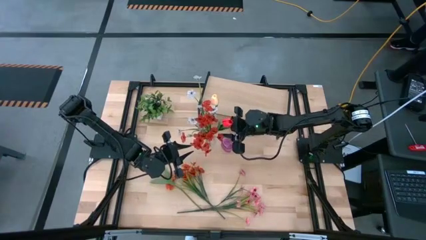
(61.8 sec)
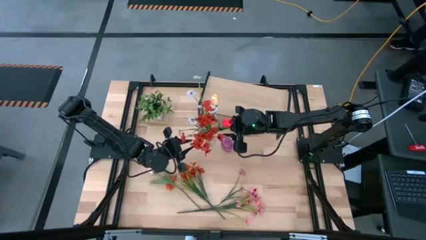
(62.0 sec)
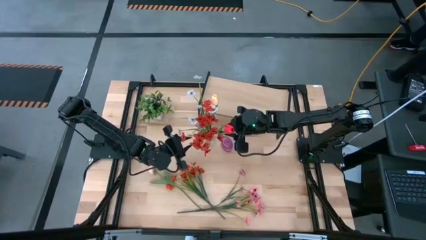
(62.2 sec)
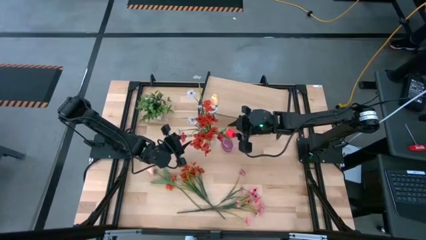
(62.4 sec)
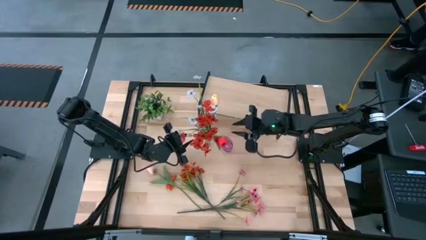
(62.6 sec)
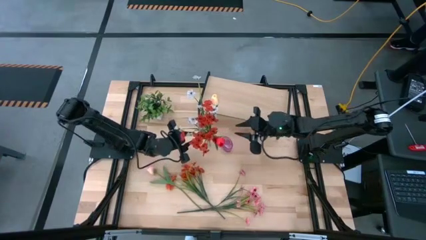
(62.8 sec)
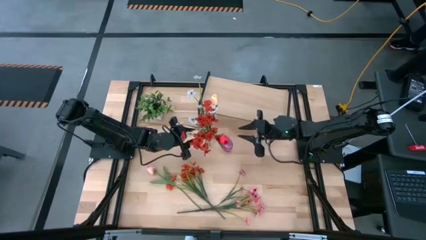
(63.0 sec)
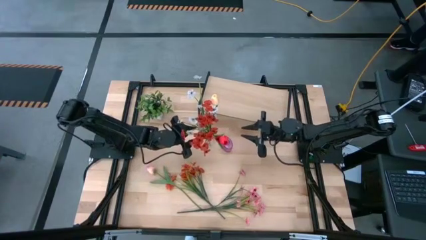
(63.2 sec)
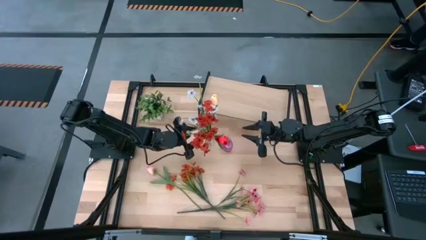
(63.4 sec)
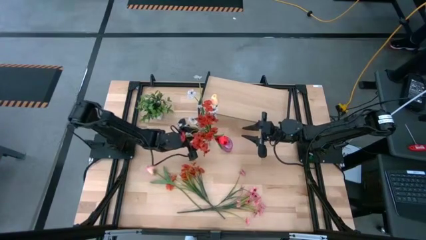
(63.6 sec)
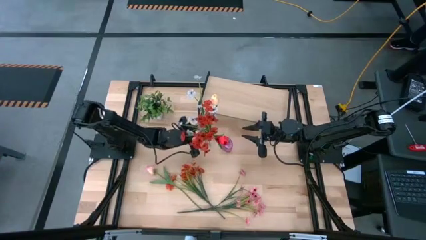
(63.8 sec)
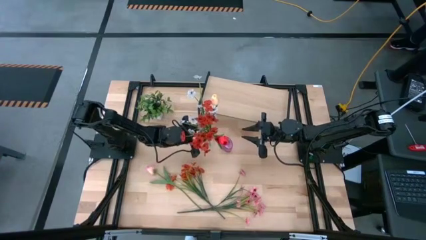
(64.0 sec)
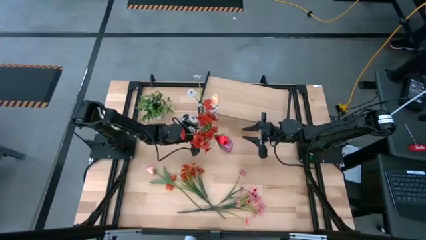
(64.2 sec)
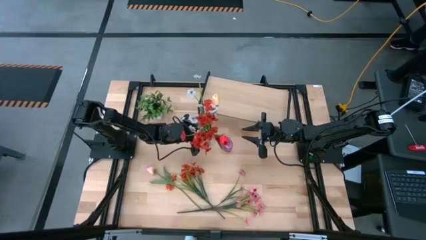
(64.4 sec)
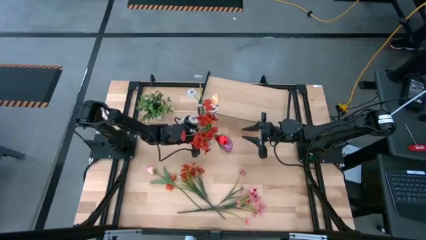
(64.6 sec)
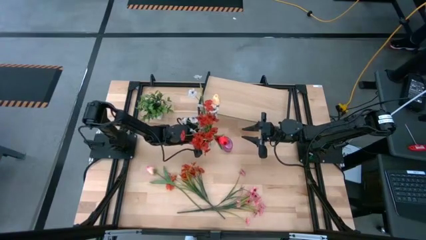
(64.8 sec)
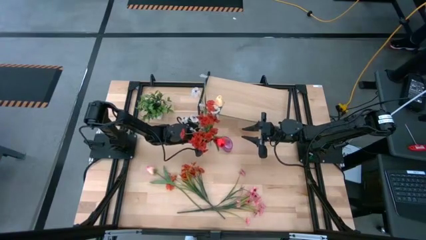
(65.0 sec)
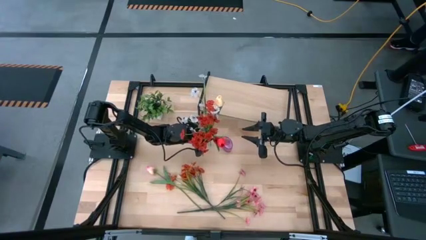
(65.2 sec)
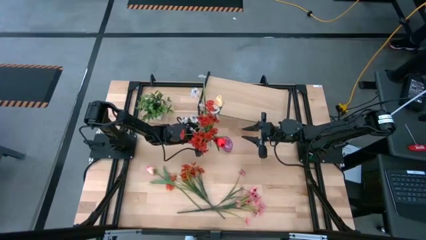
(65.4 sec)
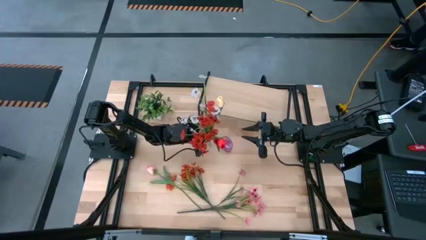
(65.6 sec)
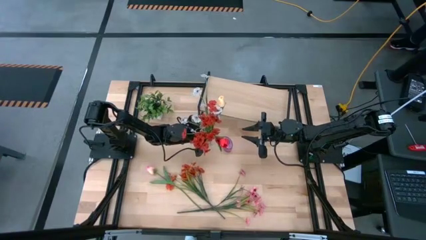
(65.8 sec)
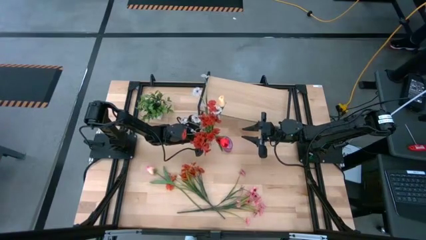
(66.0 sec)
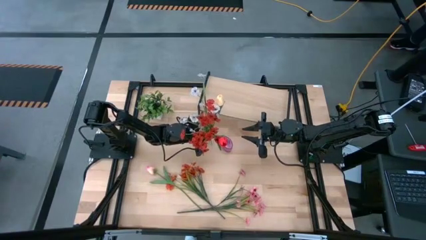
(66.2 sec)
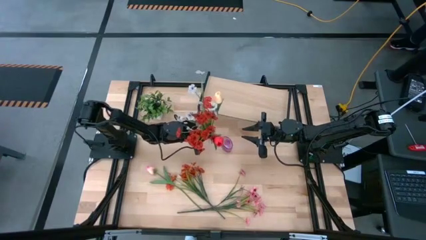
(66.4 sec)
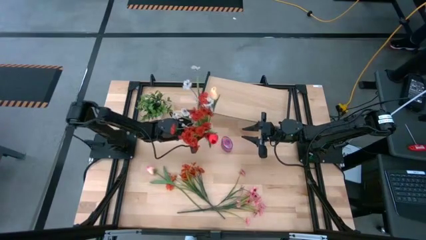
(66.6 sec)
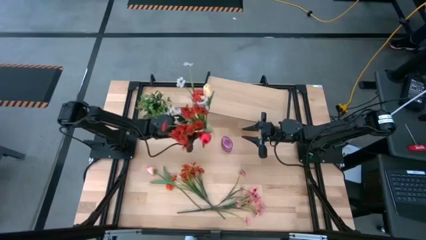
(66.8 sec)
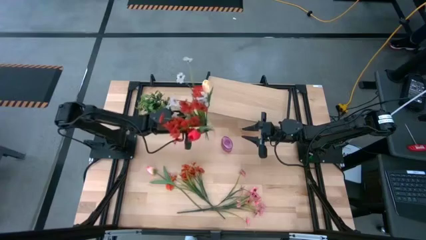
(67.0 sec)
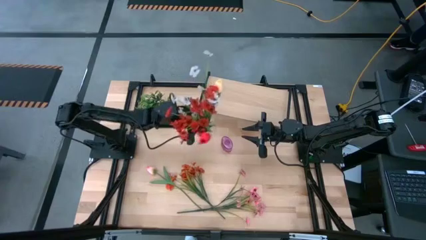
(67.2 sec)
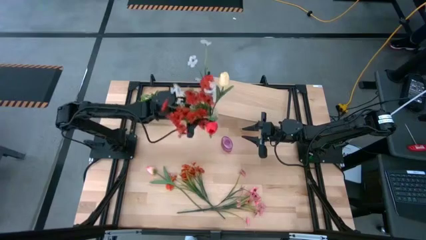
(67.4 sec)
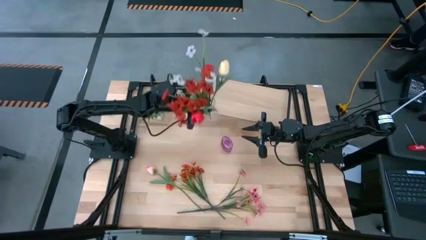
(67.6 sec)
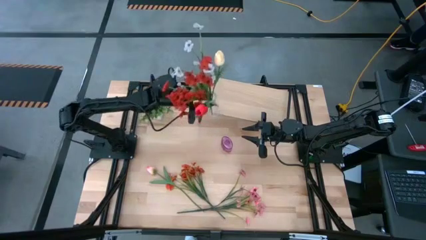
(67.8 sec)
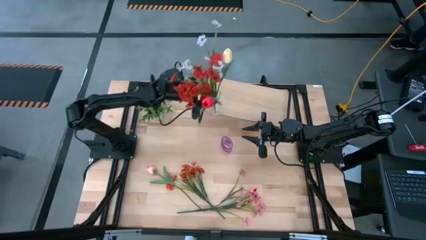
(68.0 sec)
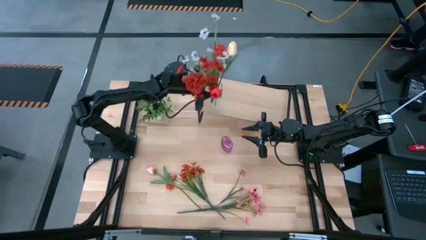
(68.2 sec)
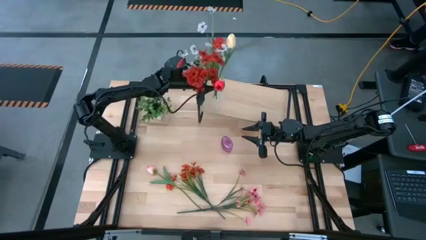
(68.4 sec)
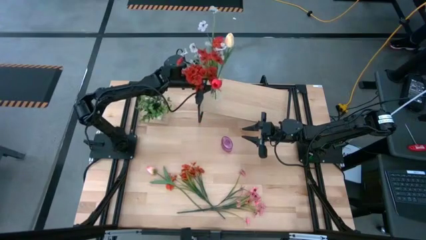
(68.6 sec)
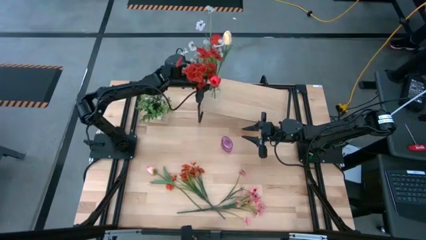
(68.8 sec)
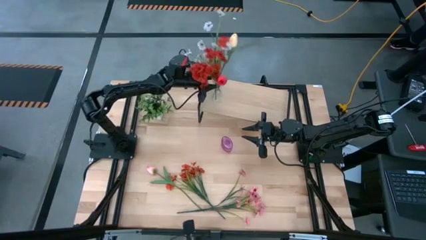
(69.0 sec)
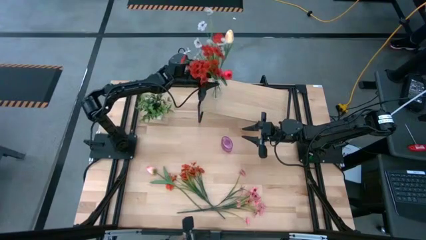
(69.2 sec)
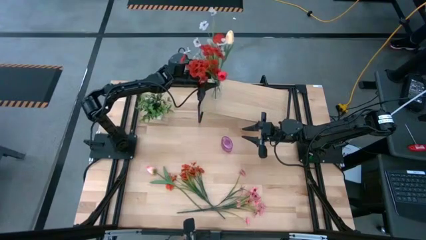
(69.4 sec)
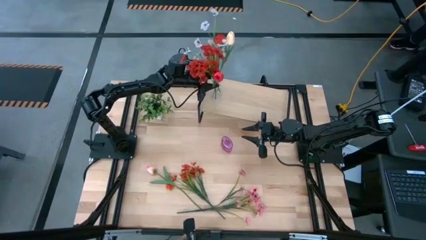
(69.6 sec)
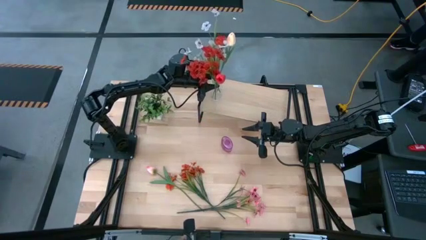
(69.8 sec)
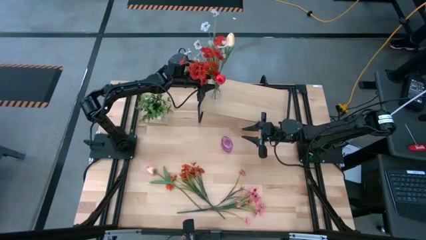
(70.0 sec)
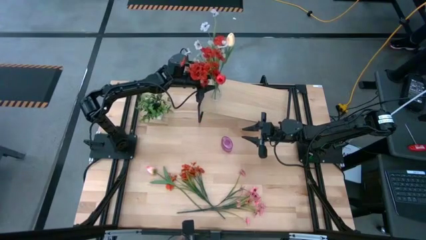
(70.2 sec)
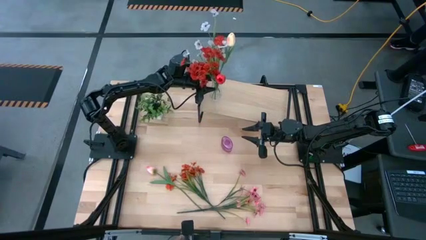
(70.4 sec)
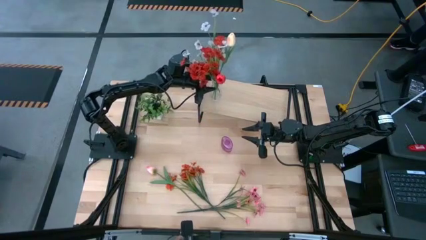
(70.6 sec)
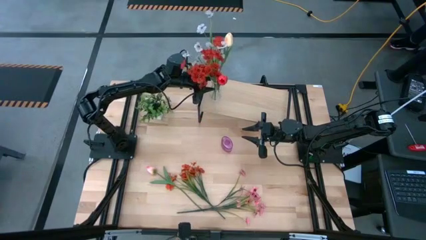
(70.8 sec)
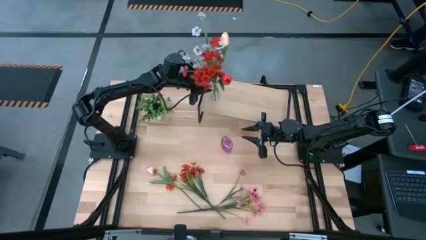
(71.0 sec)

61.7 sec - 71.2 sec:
Task: Pick and place flowers into a vace then onto a shelf
Put the transparent vase with the flowers on the shelf

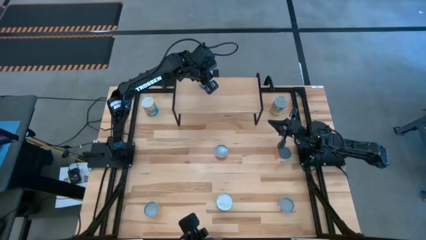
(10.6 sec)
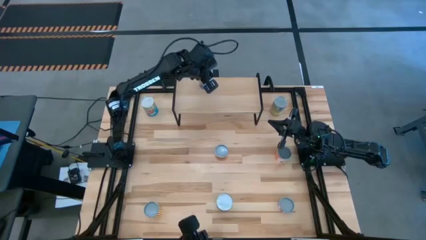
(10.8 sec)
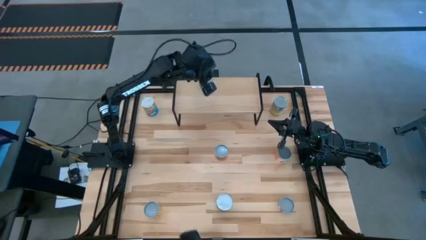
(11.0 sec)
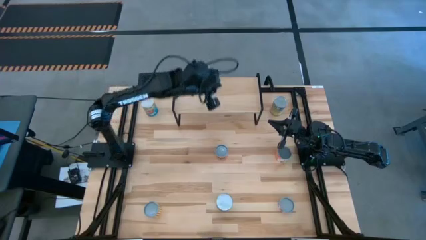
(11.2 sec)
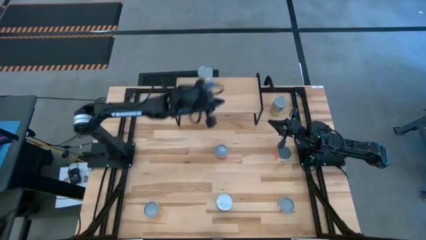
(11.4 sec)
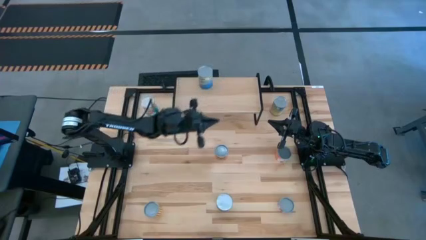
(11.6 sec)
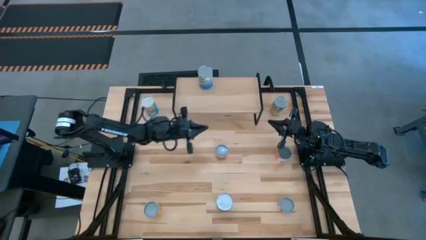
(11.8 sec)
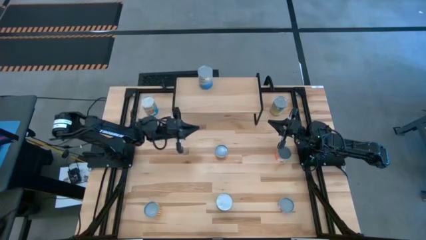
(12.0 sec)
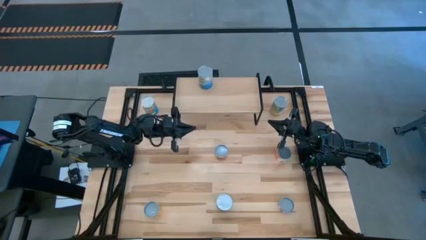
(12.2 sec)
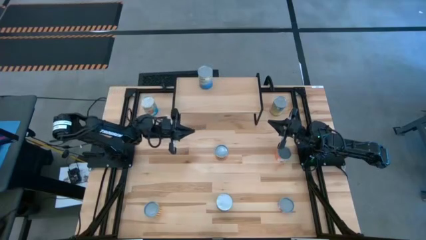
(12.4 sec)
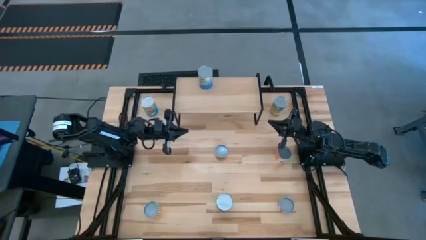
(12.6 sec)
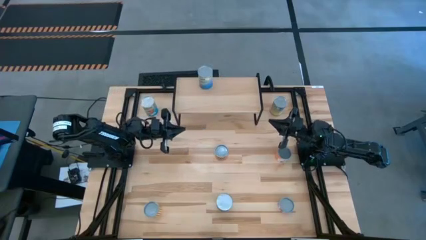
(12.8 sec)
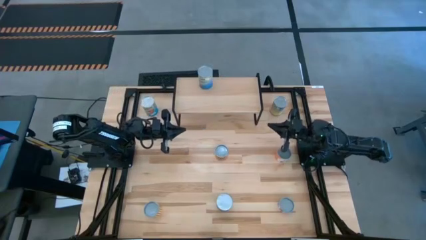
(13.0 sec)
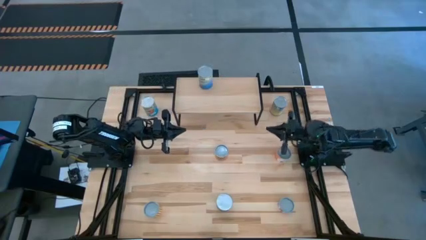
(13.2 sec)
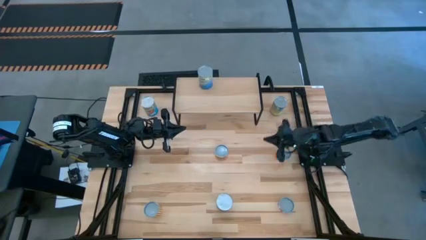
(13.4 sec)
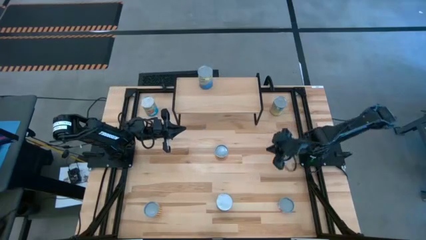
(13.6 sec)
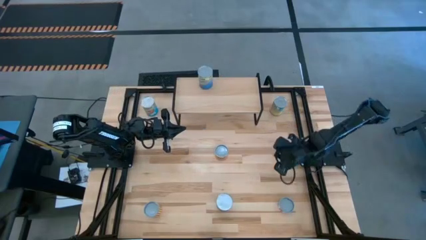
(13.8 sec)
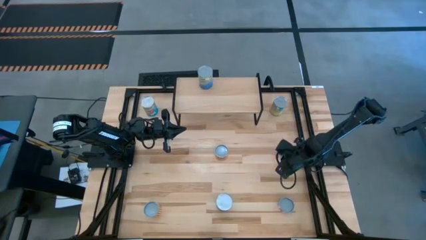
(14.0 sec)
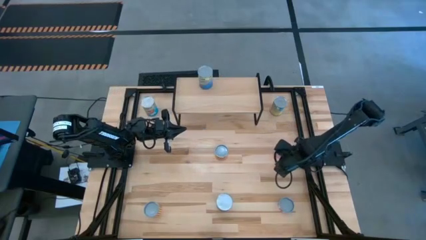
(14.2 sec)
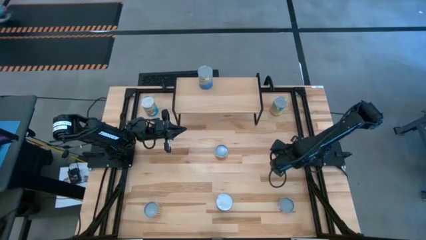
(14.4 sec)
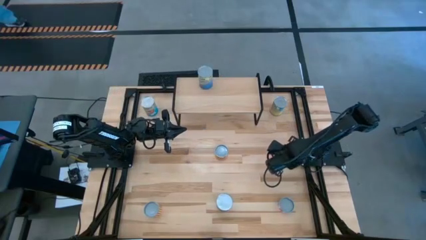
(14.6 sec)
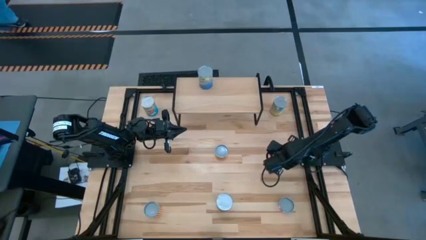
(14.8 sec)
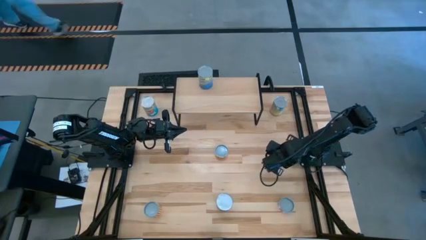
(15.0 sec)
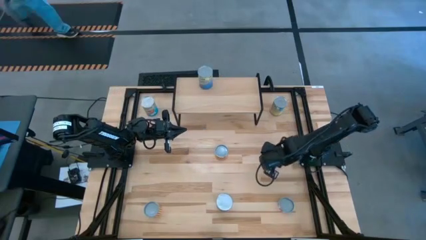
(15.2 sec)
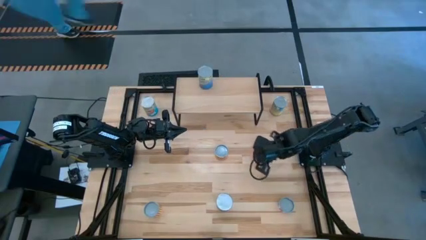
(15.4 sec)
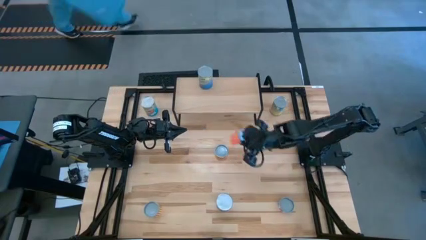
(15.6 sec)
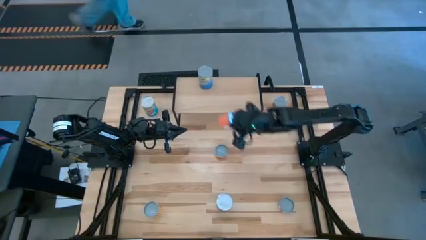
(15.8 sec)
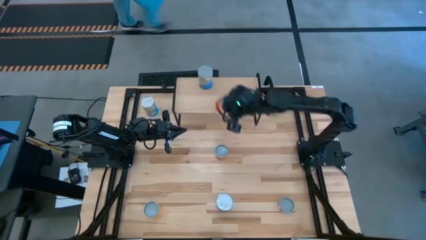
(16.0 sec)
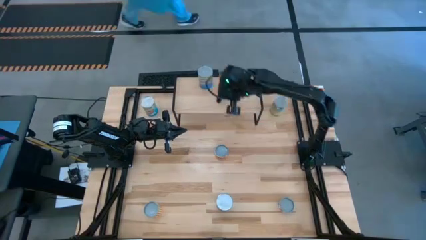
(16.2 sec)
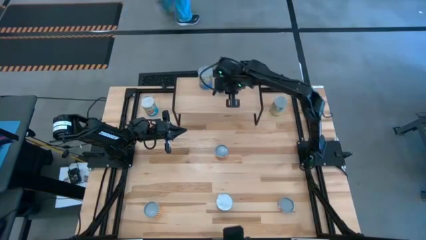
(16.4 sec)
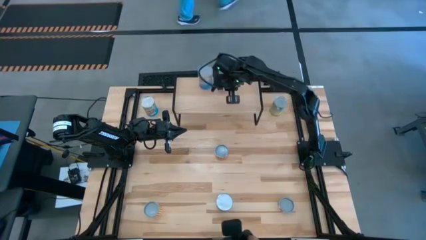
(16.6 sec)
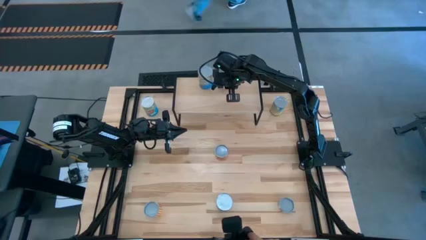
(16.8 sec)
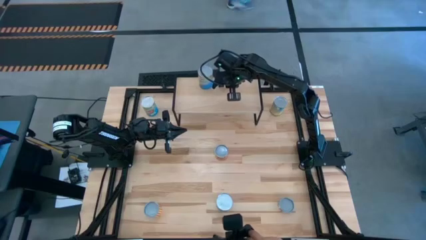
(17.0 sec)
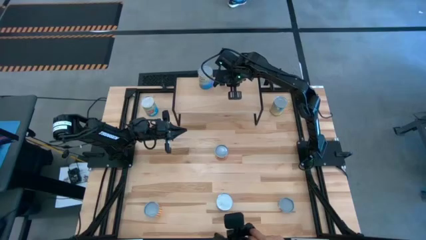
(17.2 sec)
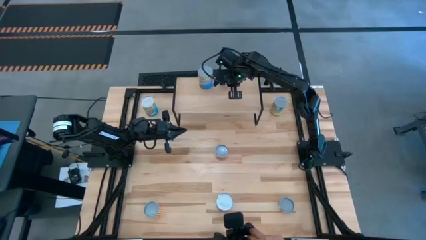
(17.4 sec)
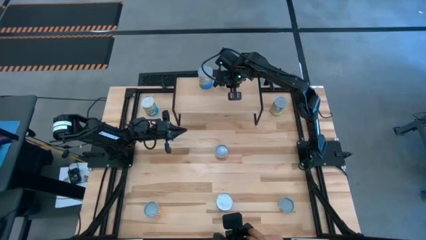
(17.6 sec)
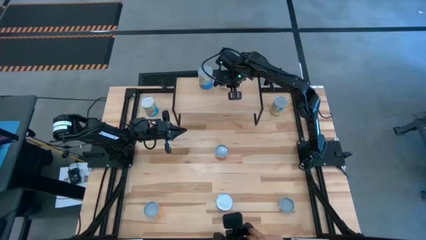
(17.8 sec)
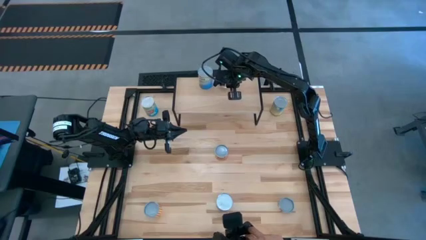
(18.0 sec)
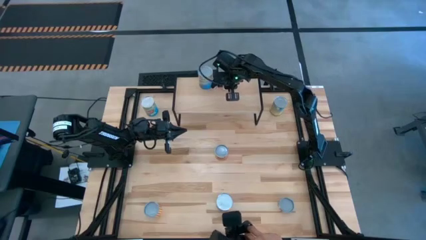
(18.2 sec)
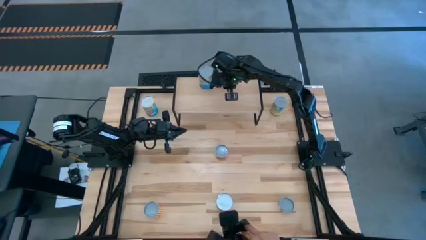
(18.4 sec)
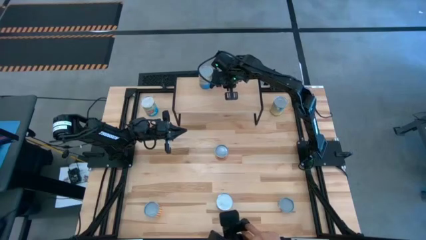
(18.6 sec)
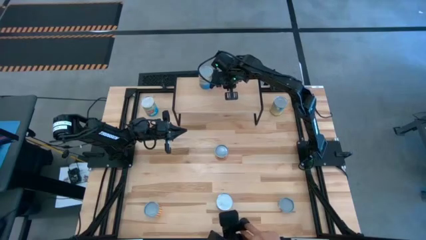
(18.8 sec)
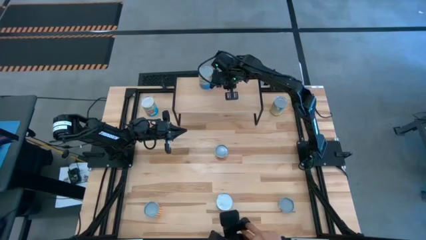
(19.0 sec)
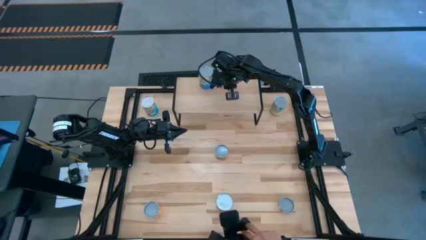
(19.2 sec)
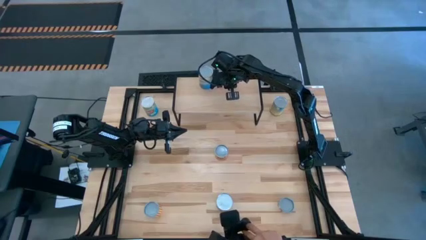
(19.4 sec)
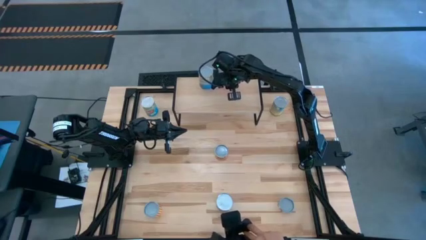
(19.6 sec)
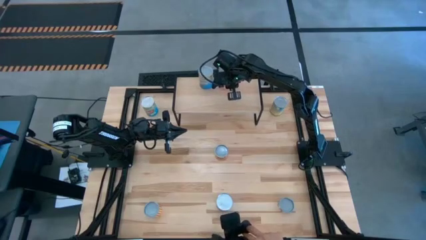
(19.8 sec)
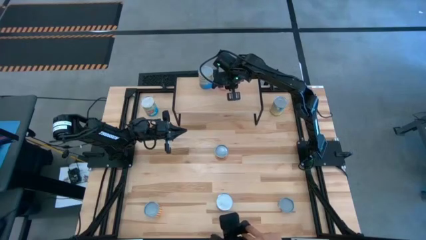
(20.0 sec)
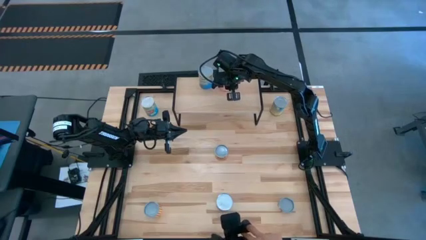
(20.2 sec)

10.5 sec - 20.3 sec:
Task: Pick and place cans onto a shelf
Put the orange can on the shelf
